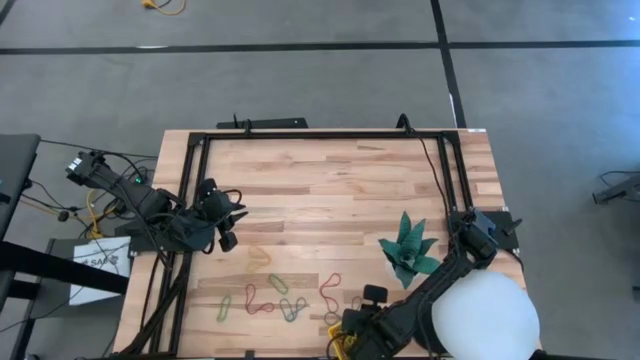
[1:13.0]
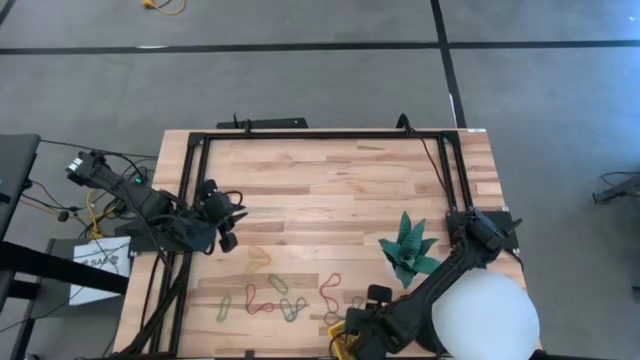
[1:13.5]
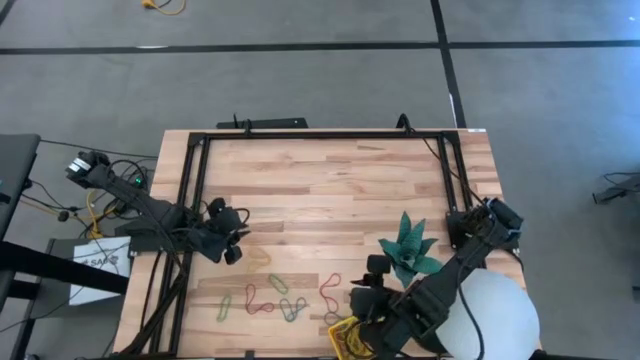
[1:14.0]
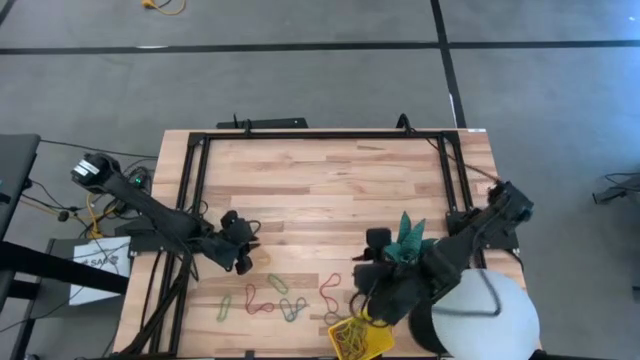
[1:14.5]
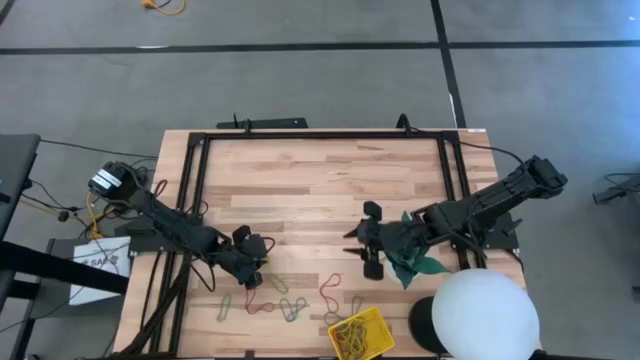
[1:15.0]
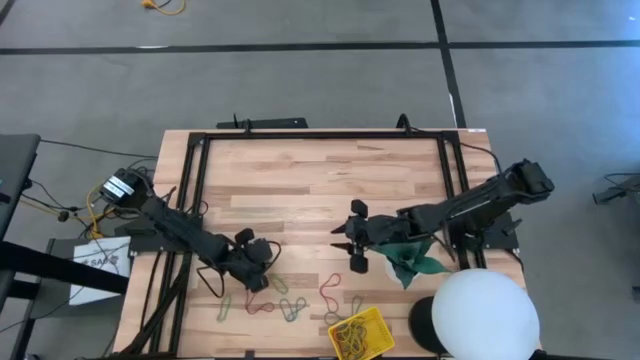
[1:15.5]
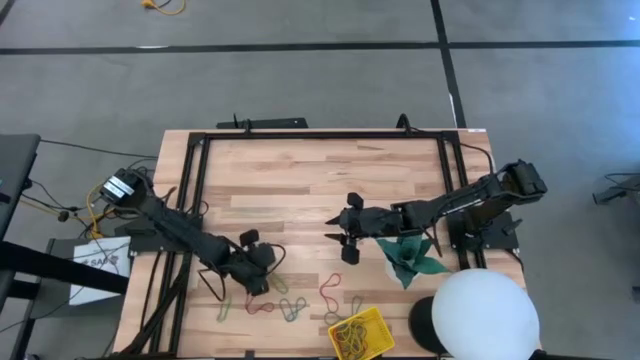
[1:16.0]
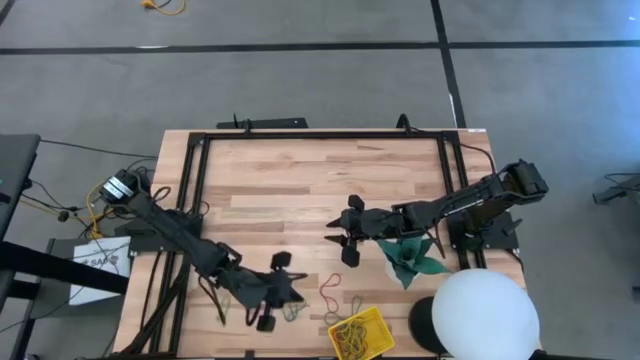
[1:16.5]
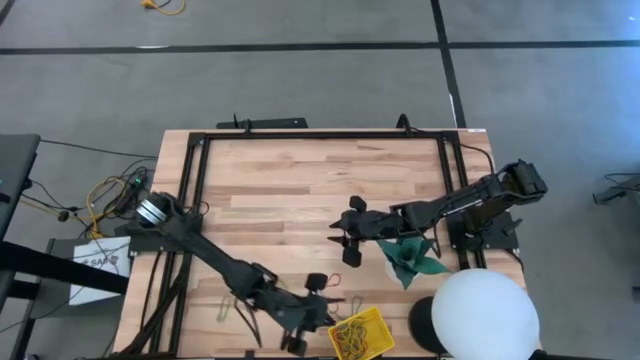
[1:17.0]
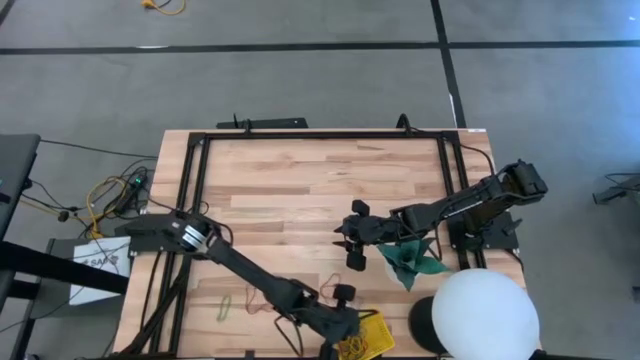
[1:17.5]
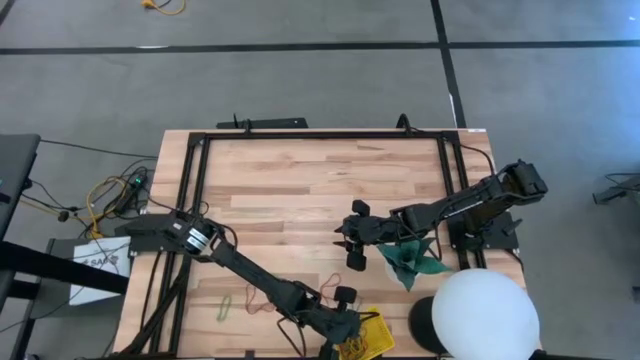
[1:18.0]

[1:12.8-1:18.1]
Task: Pick and place items into bin
Put the yellow rubber band into the yellow bin

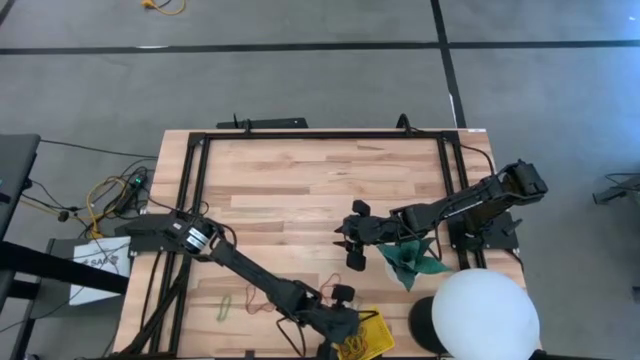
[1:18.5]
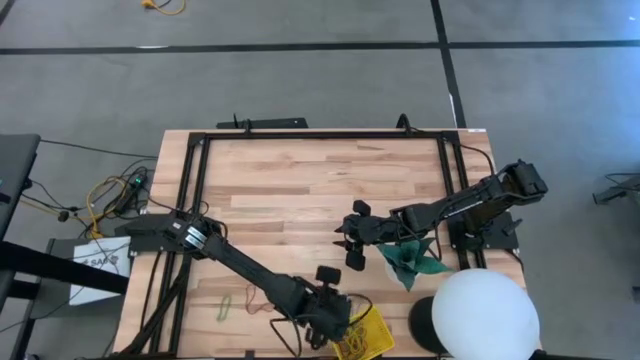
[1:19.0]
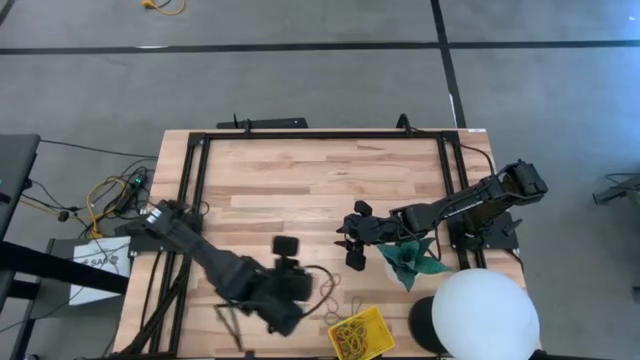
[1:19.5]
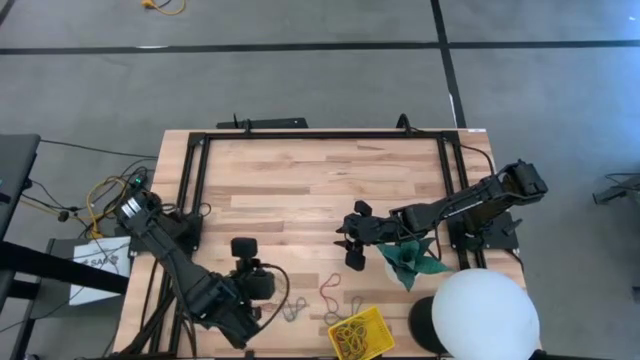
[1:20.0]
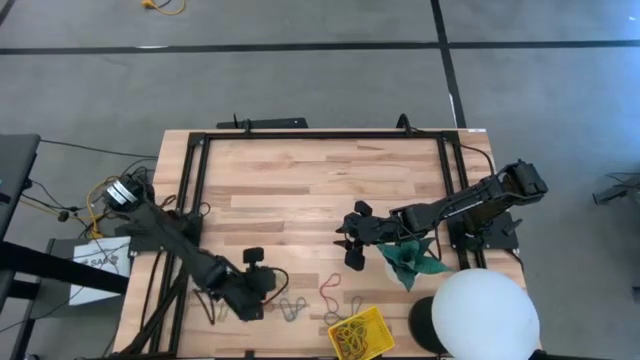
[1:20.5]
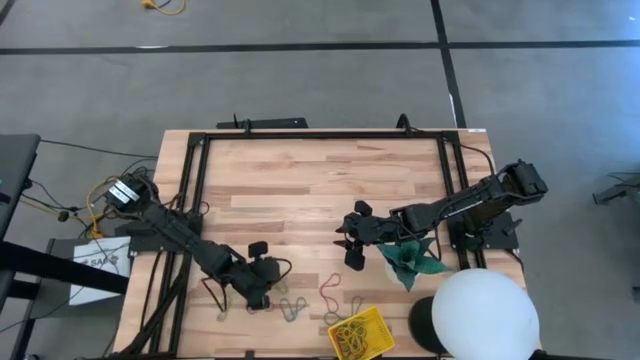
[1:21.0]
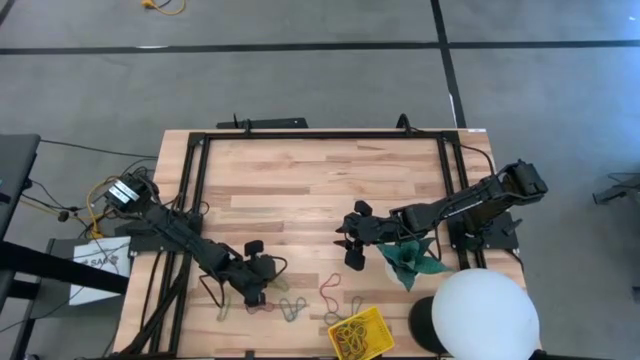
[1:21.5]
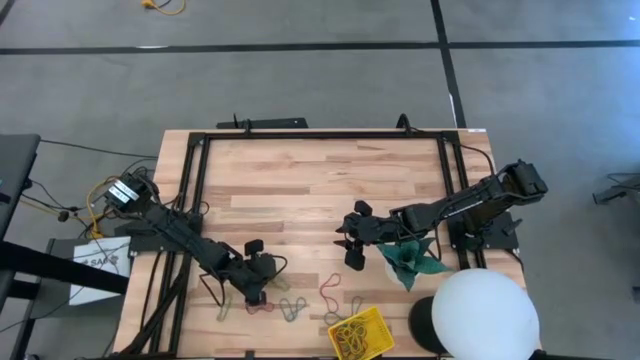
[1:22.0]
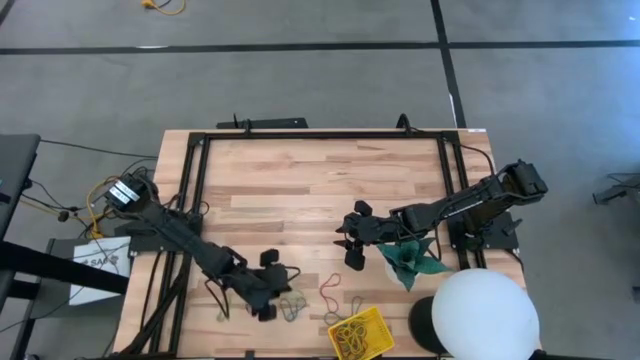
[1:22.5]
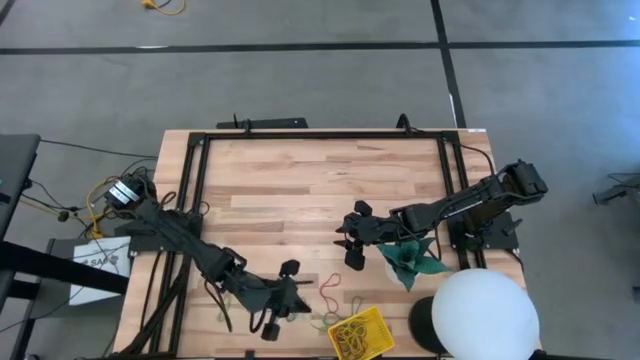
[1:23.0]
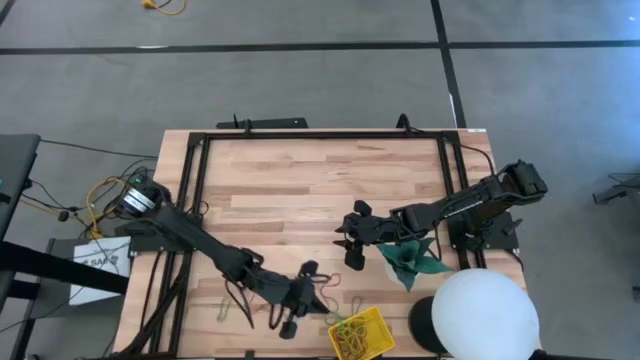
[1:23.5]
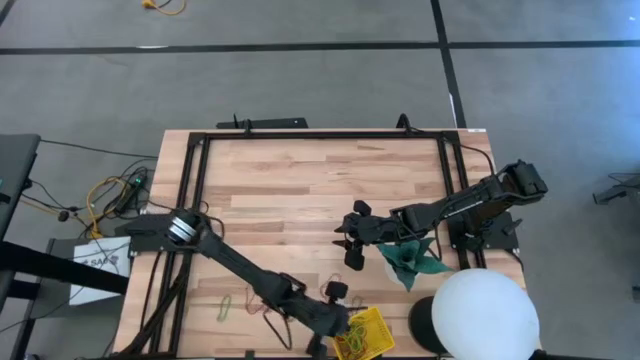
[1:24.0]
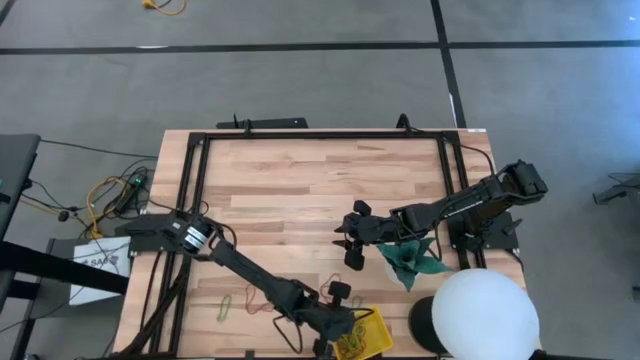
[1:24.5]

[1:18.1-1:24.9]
Put the green rubber band into the yellow bin

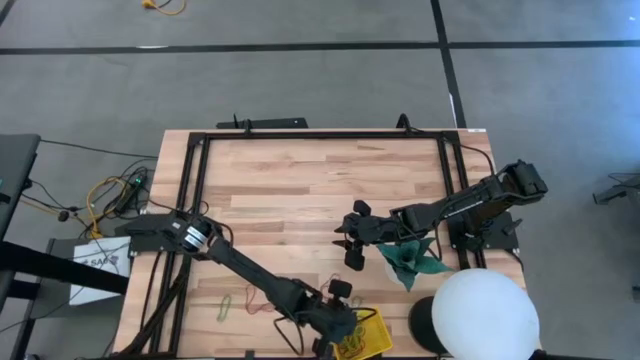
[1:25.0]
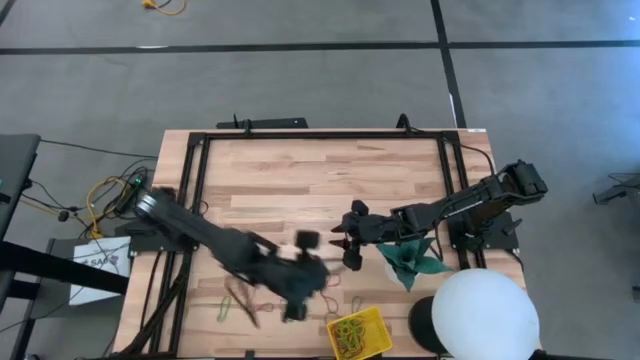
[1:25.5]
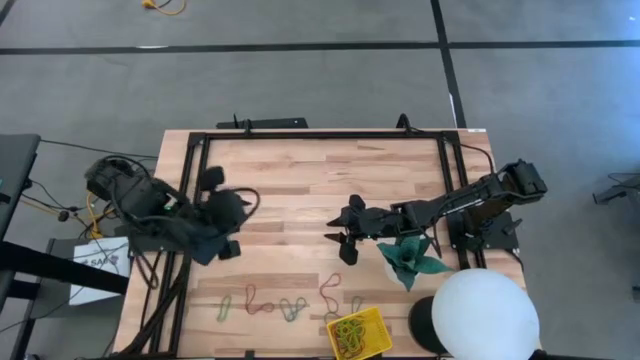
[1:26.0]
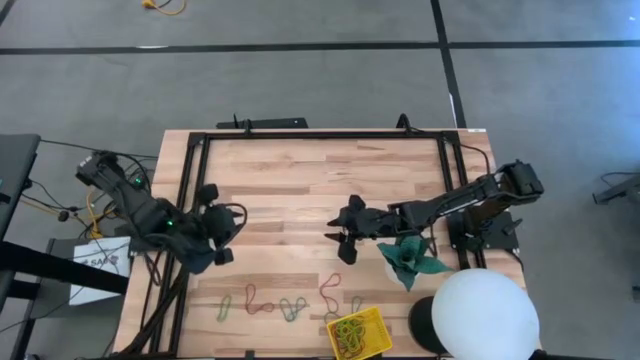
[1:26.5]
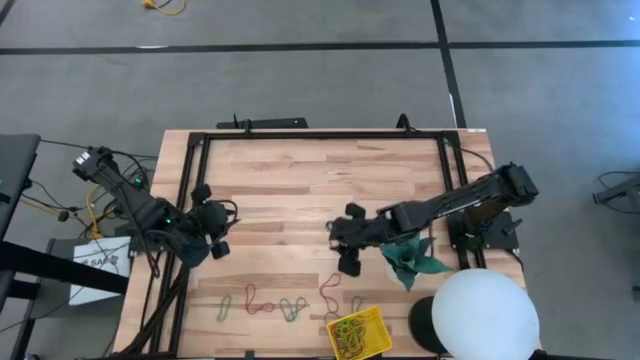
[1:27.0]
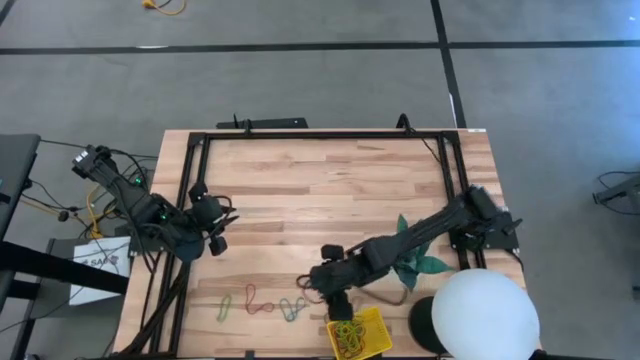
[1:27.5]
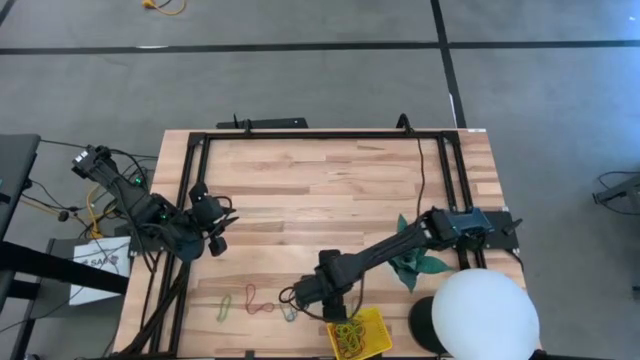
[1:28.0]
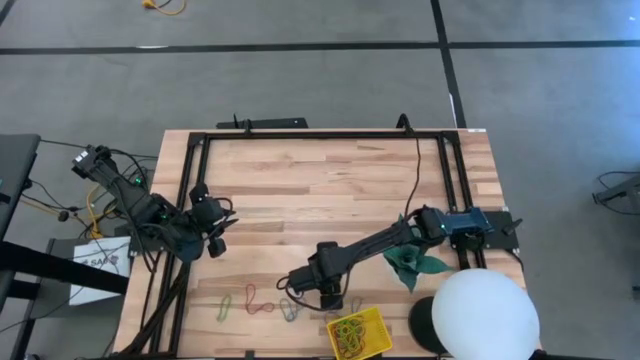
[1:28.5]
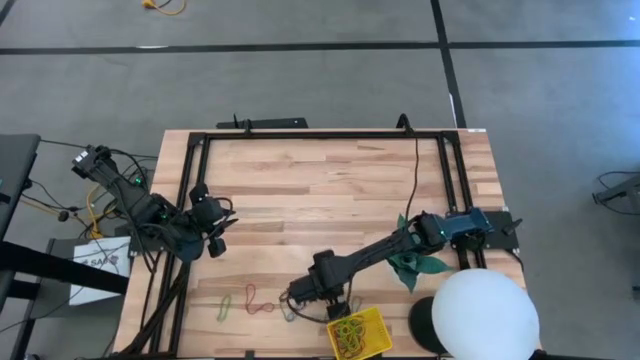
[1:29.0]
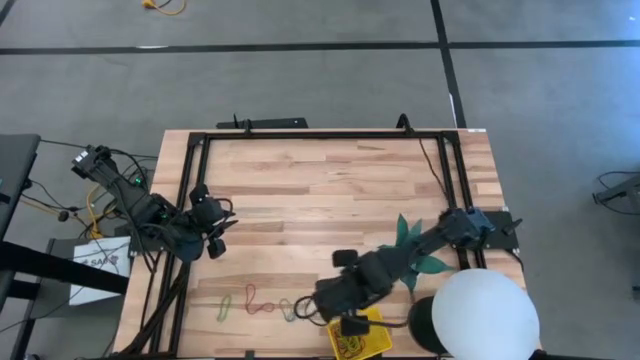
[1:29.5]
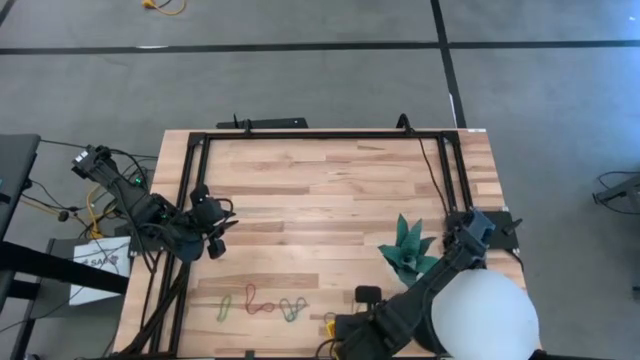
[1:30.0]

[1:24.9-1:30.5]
Put the red rubber band into the yellow bin

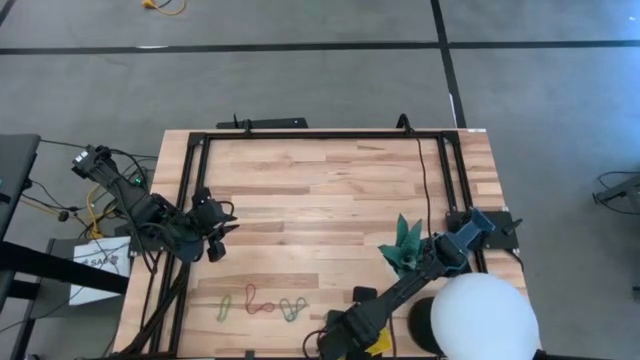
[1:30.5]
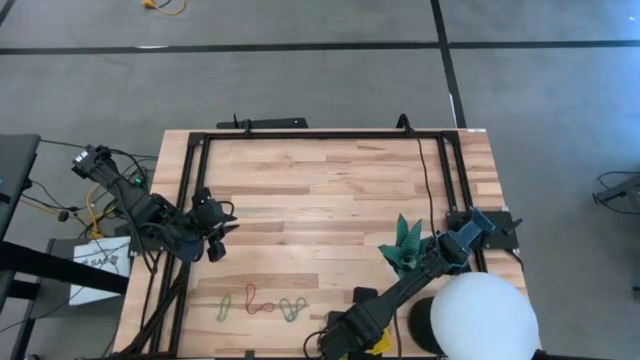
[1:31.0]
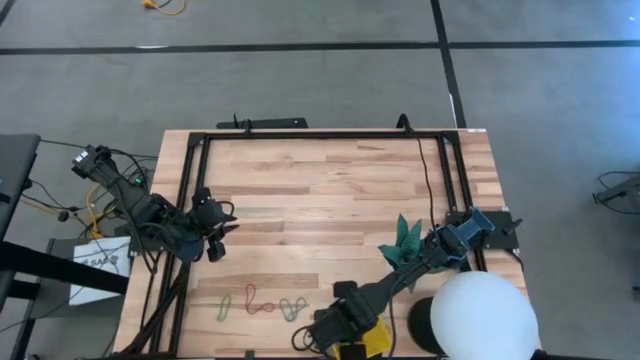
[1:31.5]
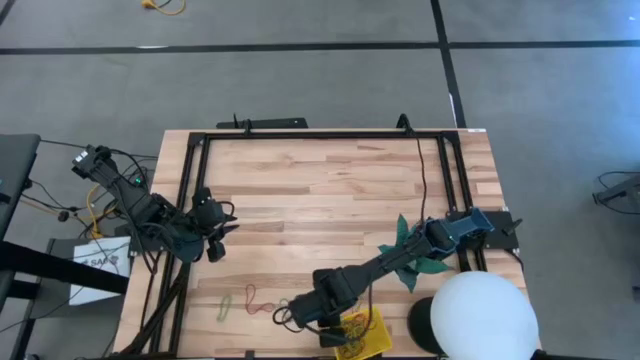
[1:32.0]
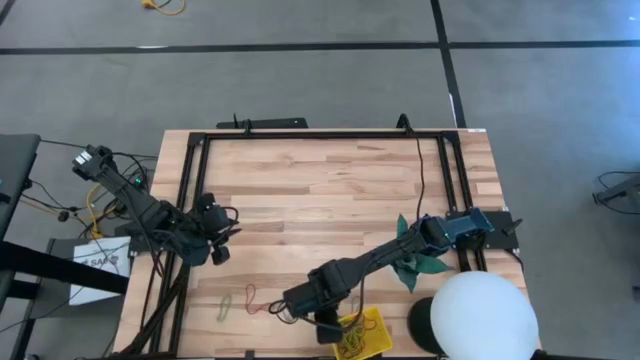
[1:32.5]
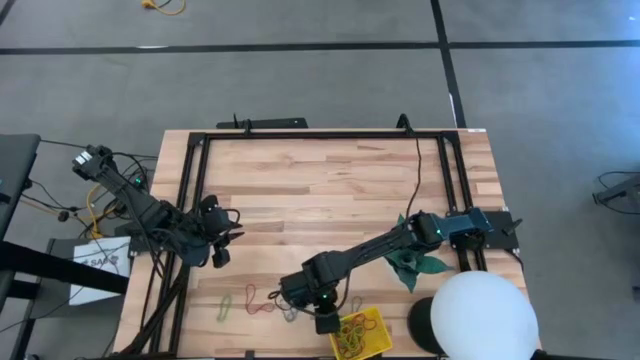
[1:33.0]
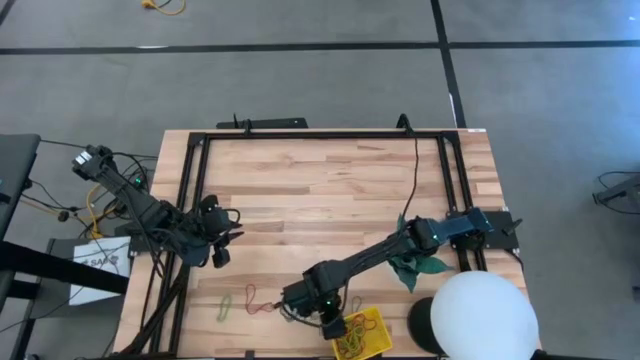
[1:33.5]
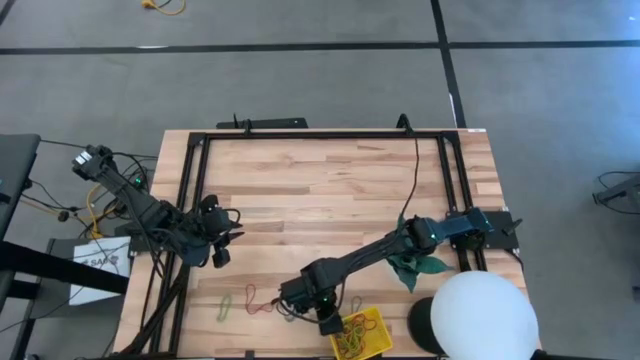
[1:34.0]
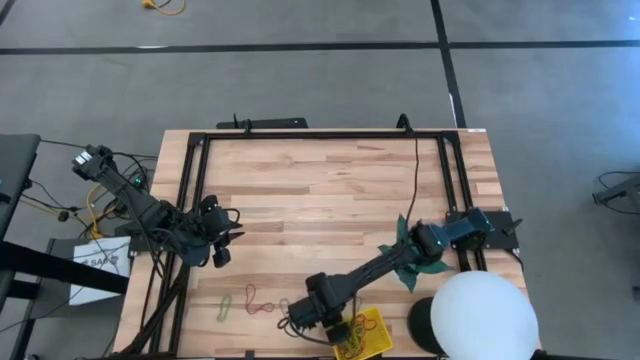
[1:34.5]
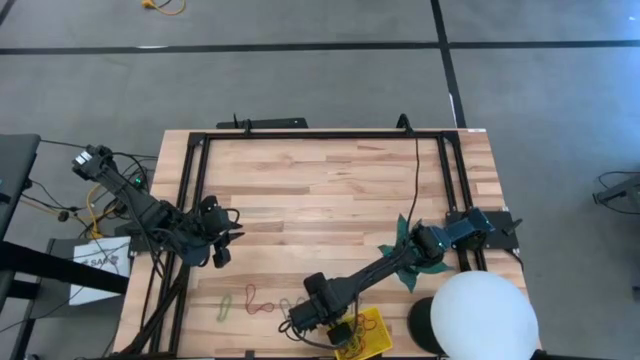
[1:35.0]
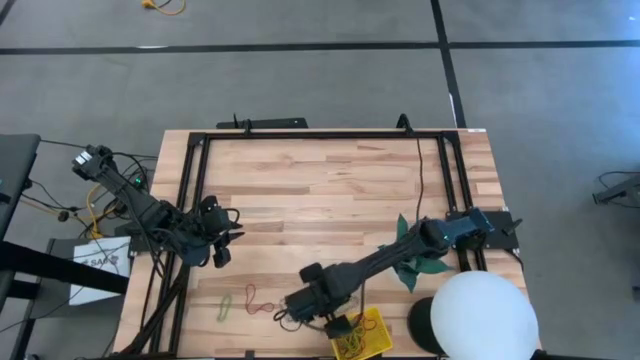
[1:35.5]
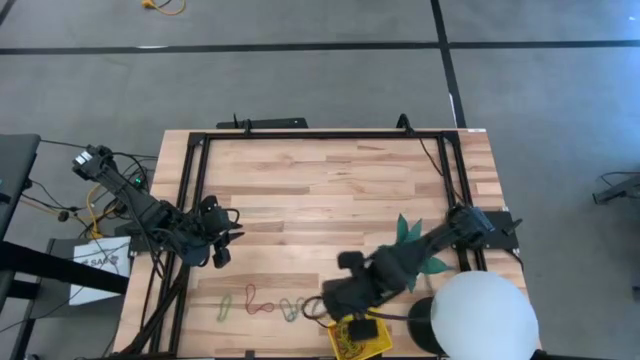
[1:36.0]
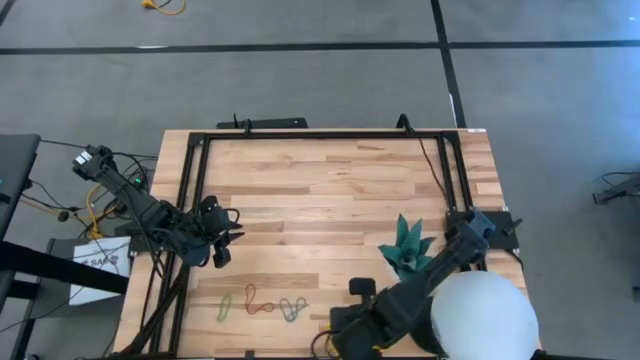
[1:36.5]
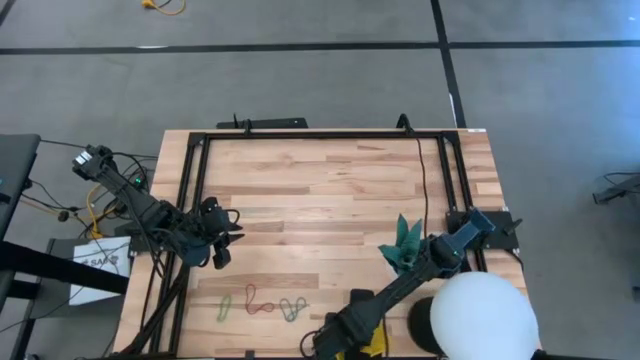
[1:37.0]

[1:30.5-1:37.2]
Put the blue rubber band into the yellow bin
